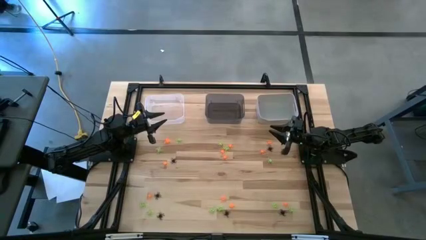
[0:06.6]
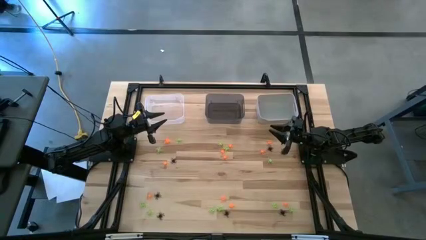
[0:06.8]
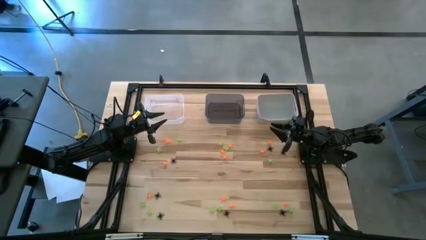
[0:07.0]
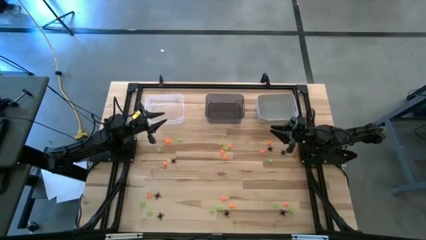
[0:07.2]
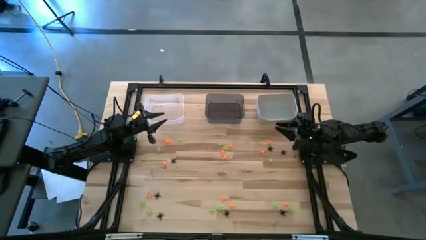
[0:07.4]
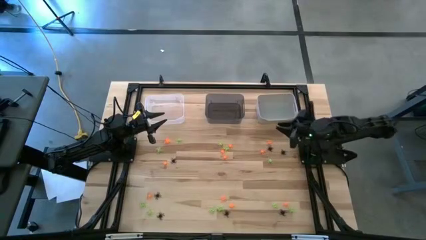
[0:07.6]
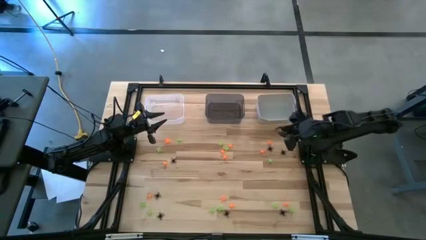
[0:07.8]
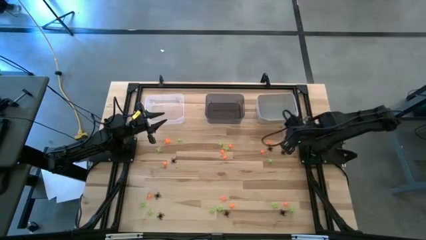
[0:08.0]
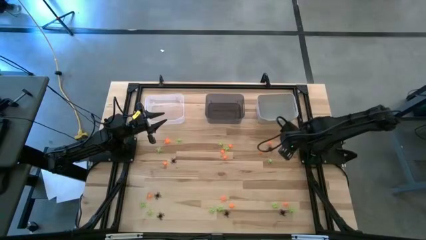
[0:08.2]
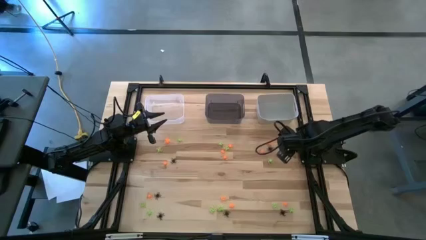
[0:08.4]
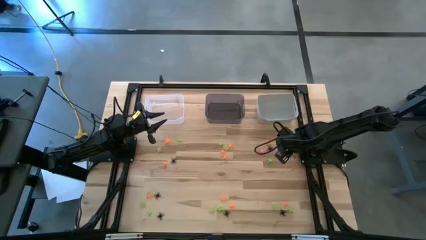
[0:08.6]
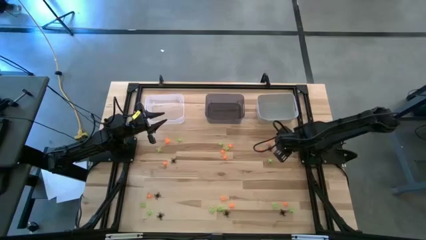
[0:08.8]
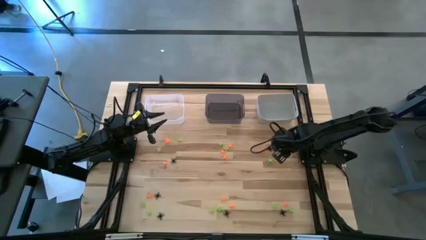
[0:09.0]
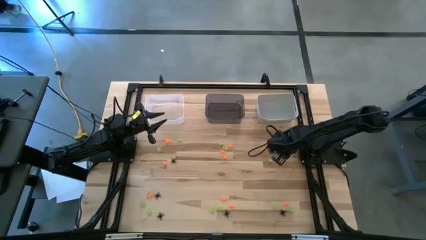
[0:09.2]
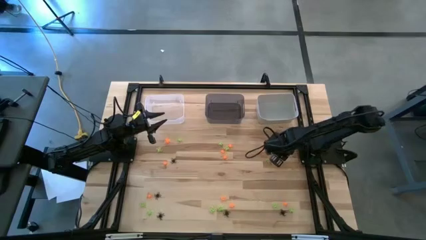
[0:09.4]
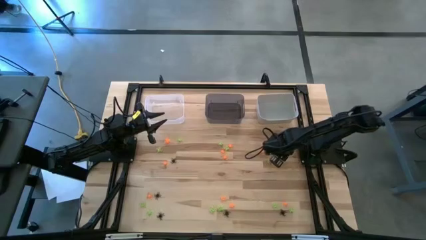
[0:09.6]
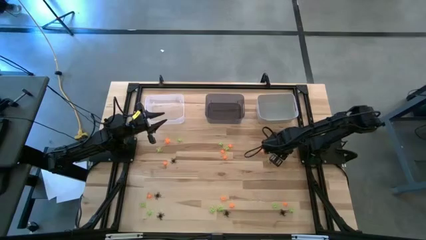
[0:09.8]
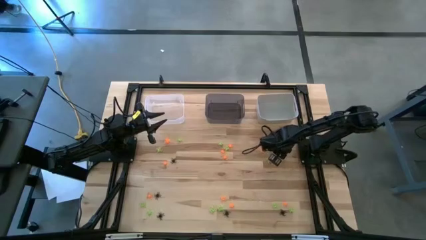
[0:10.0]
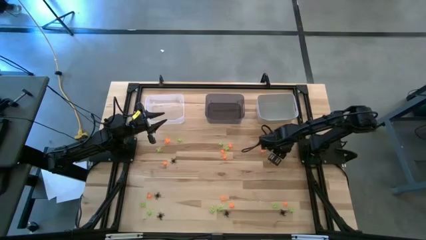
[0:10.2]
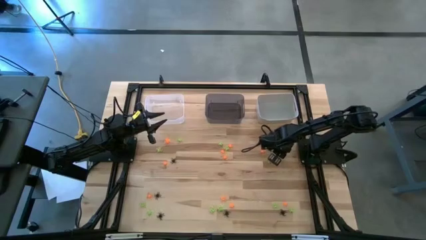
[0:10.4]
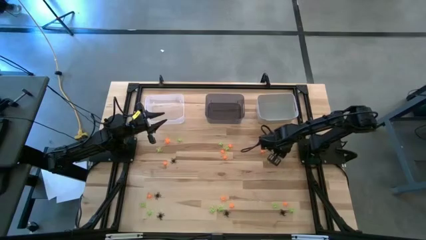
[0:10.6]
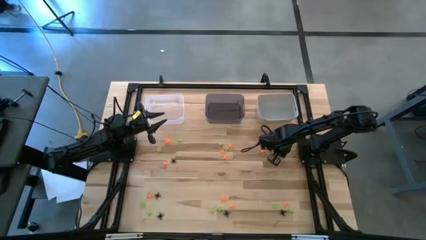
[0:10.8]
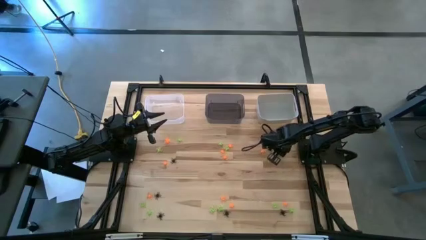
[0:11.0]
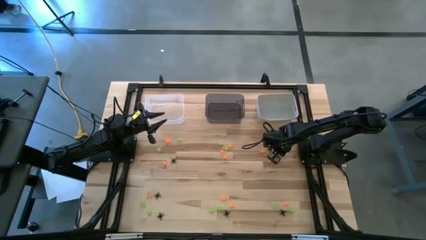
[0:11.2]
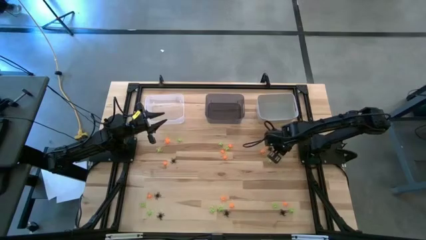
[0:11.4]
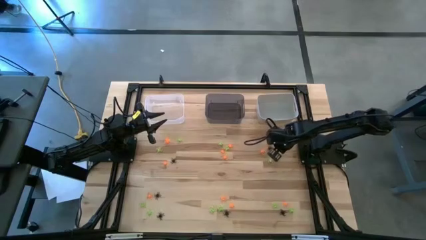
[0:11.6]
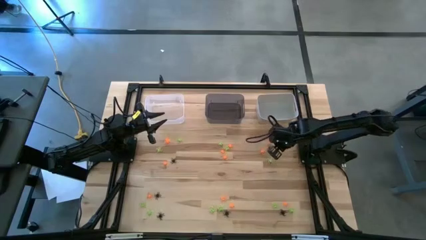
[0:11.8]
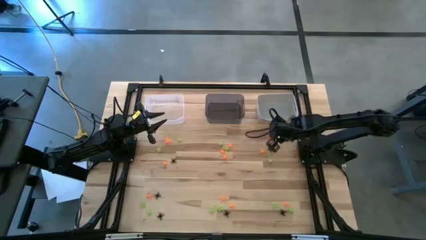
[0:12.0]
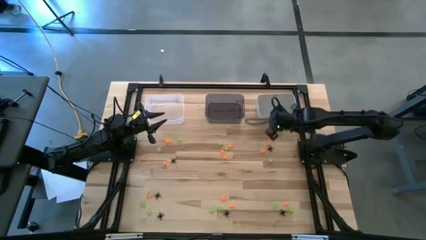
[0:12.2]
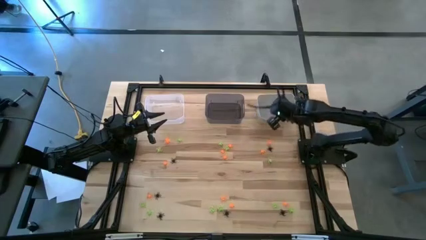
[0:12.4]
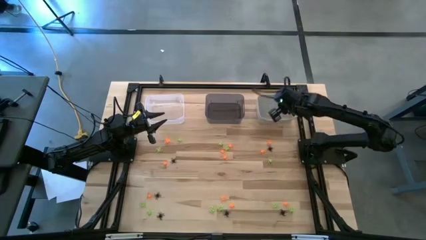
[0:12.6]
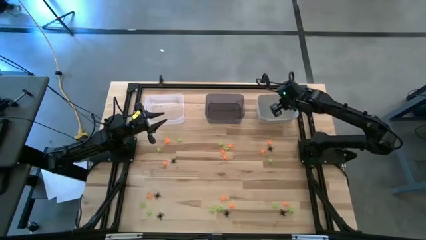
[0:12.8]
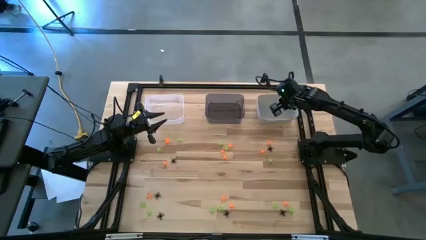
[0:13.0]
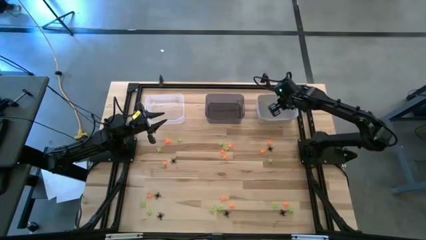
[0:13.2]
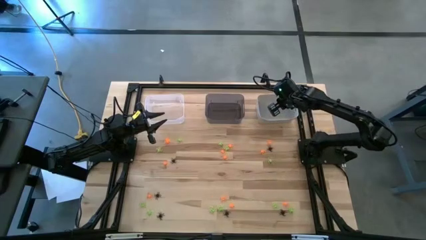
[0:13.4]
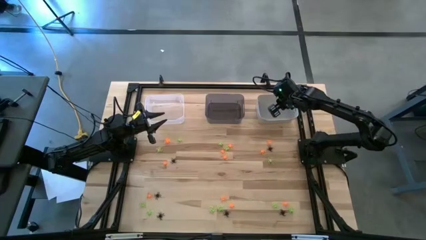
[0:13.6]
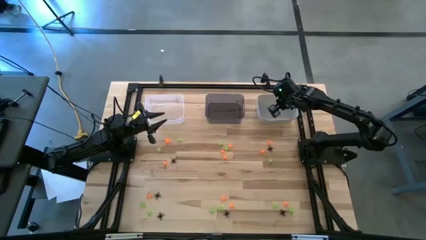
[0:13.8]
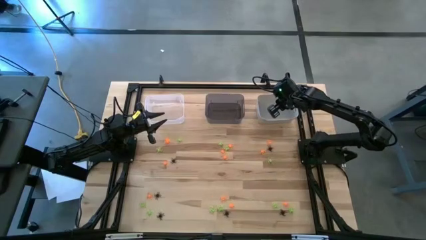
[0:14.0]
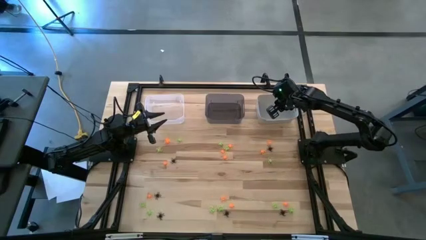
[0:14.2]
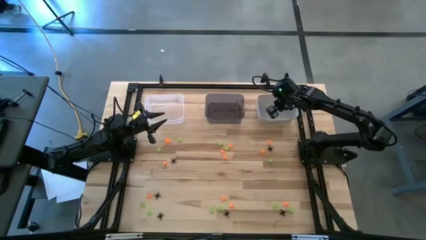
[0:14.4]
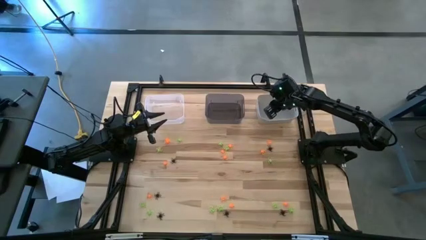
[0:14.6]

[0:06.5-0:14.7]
Task: Sort Halloween decoration
Put the black spider toy into the white bin

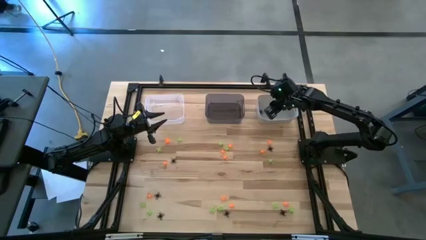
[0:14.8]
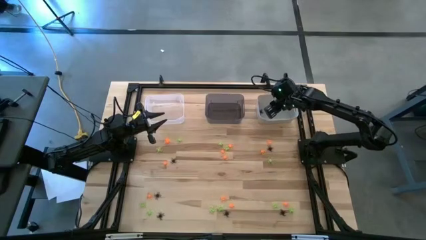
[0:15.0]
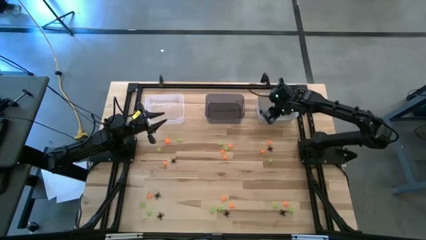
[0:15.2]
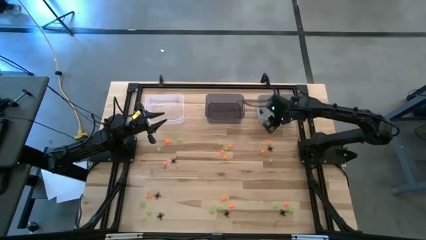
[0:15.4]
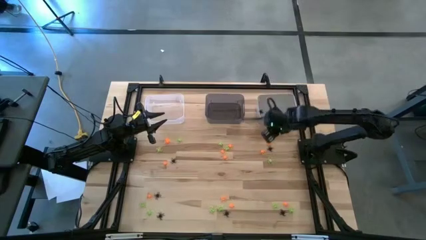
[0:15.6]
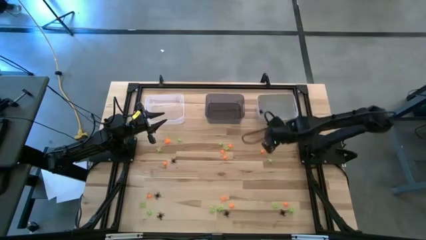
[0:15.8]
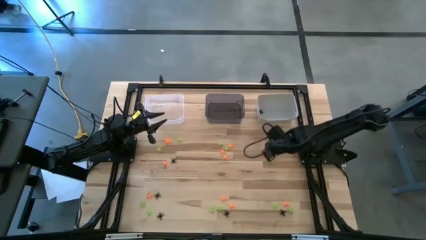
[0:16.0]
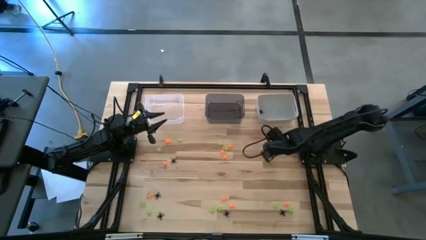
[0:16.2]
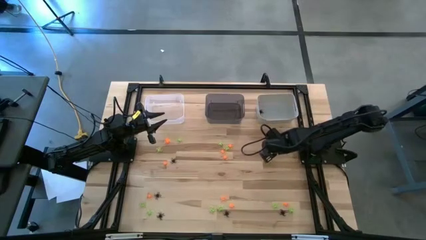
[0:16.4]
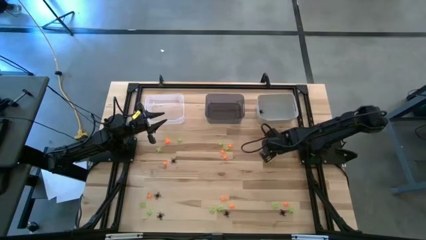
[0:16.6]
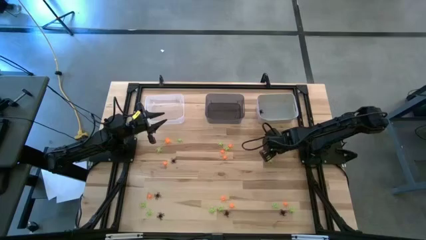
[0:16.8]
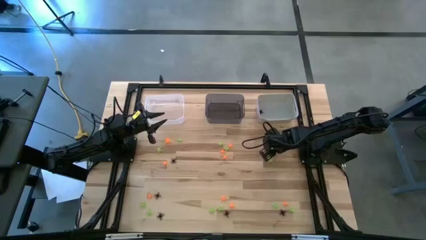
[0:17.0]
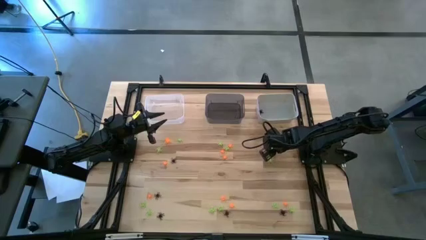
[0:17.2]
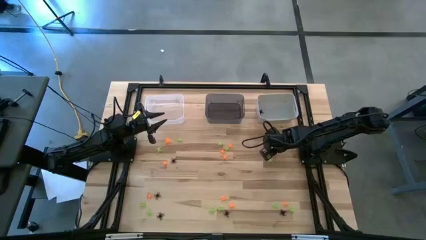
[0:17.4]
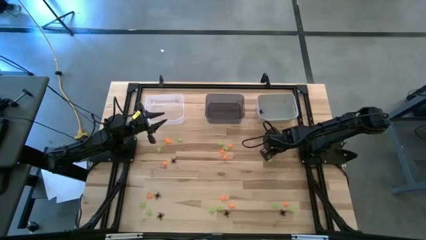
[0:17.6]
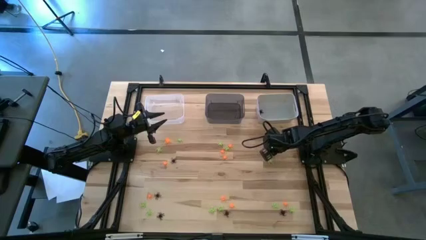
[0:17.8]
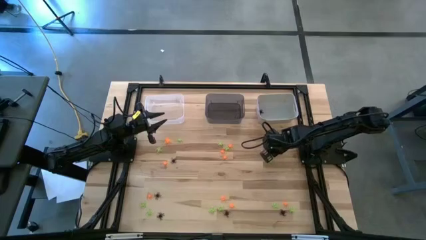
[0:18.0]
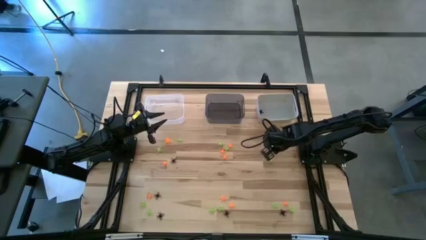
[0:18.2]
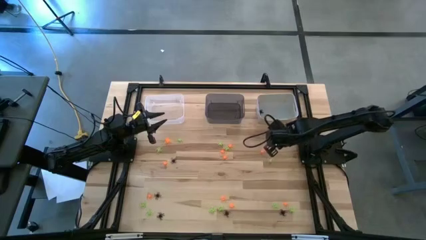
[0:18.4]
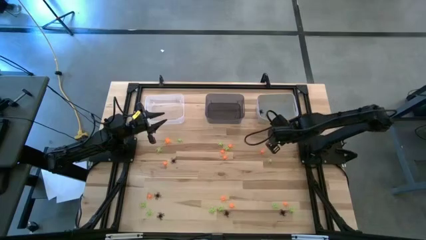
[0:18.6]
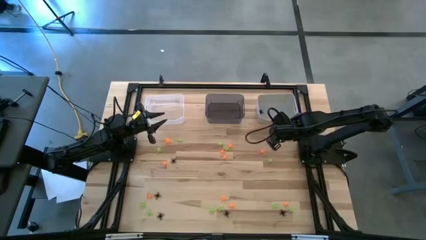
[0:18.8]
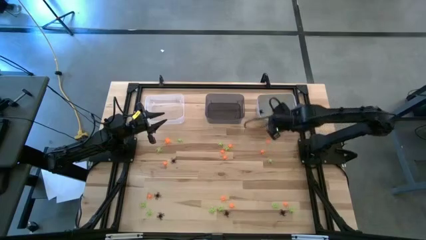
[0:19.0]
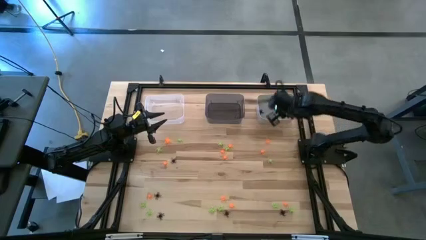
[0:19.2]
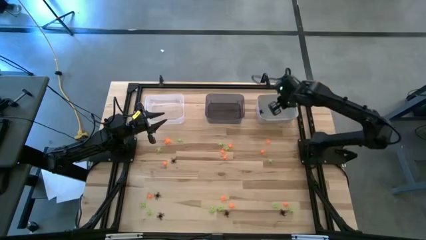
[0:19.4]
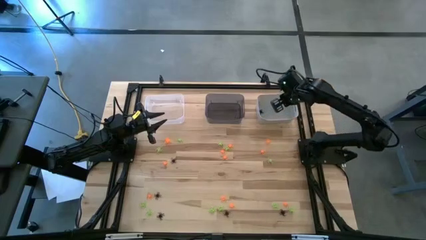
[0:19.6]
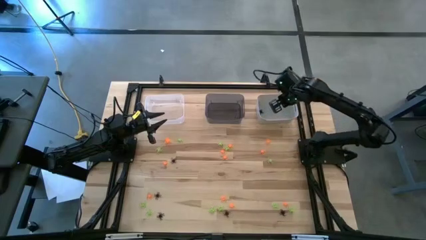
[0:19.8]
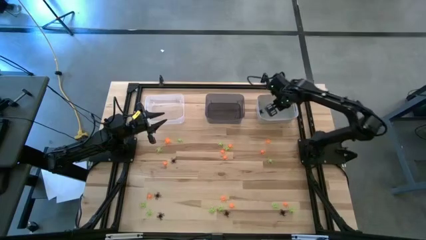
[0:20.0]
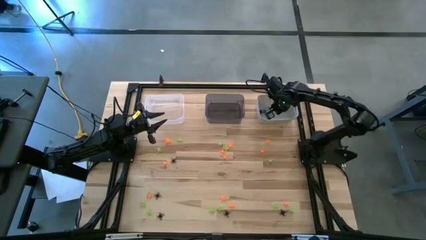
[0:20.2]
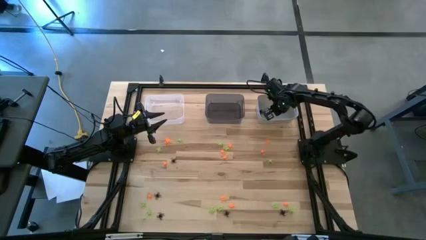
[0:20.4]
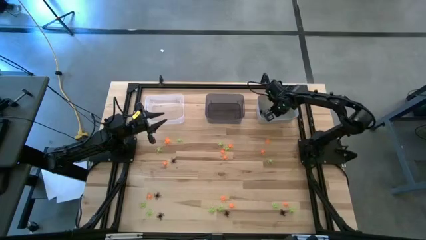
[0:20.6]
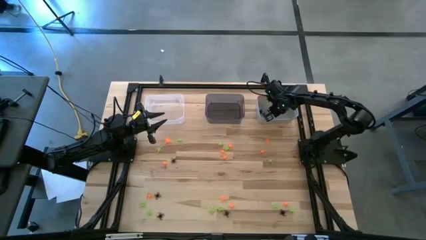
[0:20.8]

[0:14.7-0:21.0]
Put the black spider toy into the white bin

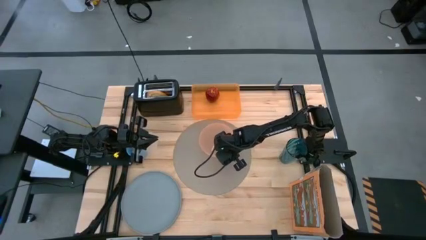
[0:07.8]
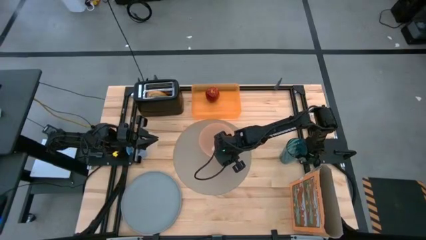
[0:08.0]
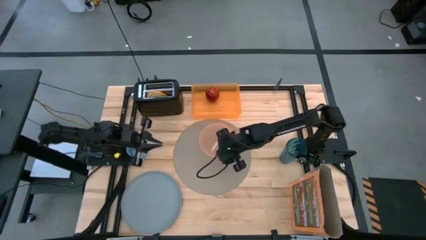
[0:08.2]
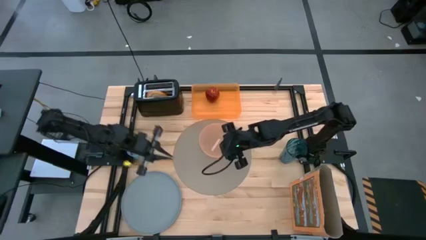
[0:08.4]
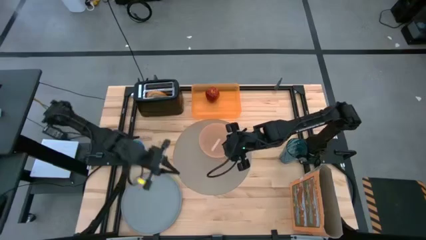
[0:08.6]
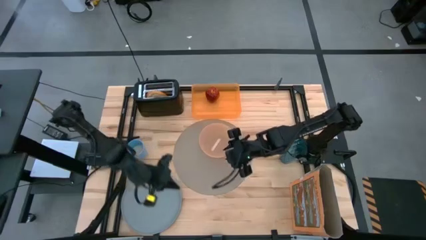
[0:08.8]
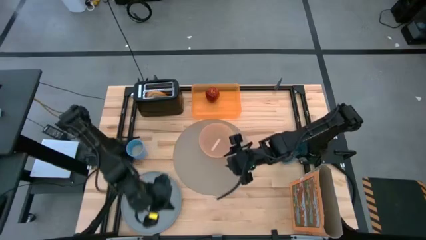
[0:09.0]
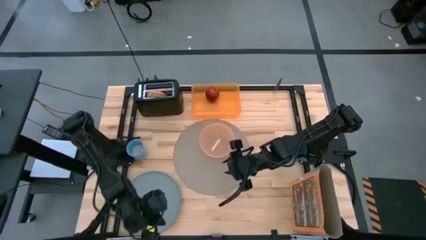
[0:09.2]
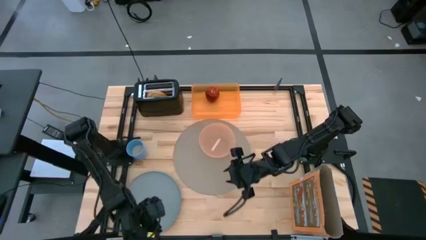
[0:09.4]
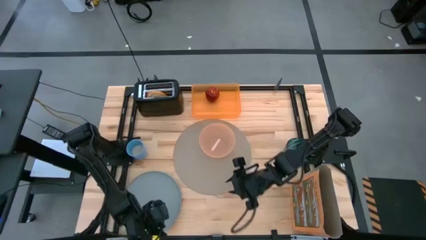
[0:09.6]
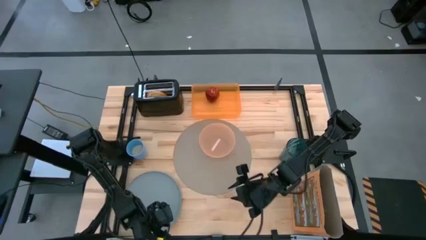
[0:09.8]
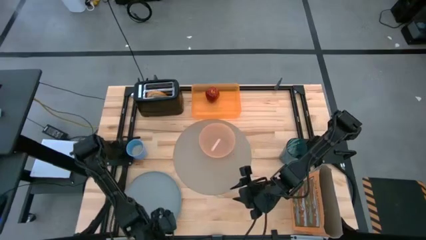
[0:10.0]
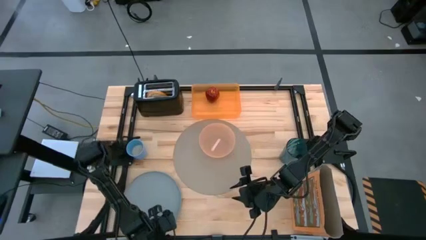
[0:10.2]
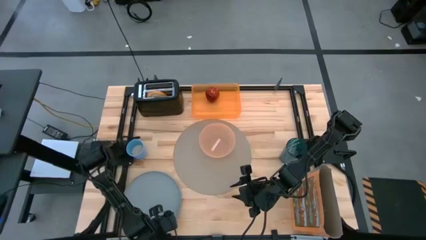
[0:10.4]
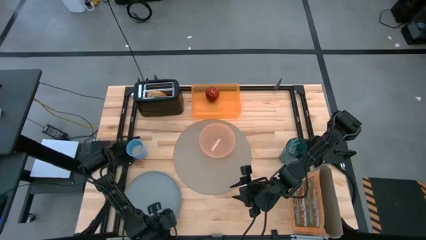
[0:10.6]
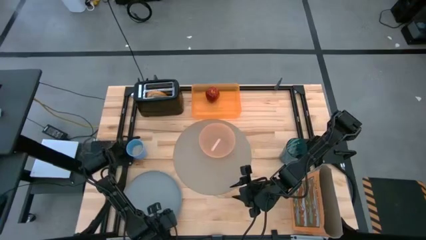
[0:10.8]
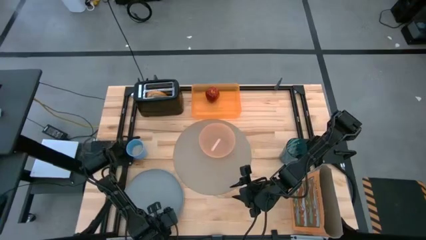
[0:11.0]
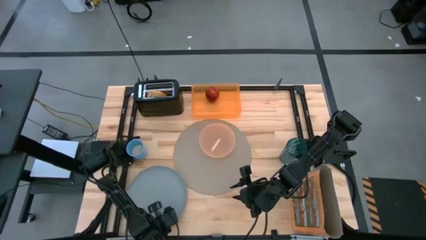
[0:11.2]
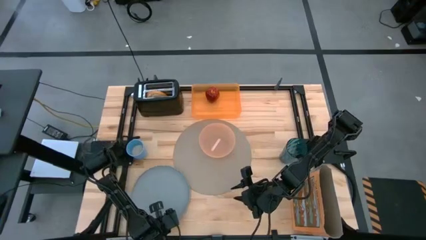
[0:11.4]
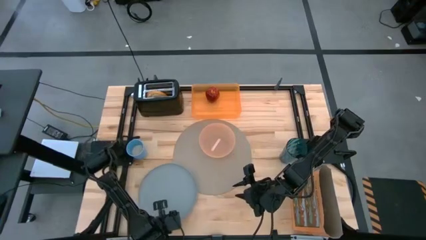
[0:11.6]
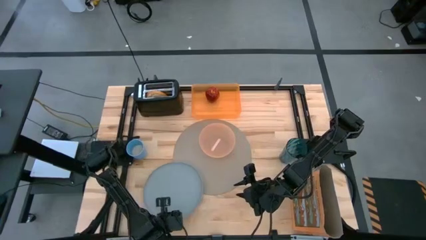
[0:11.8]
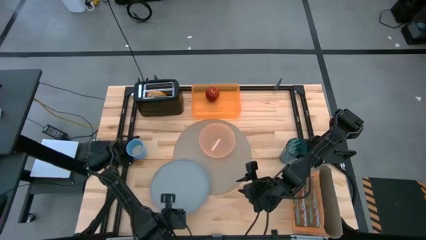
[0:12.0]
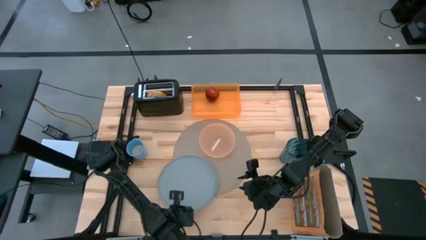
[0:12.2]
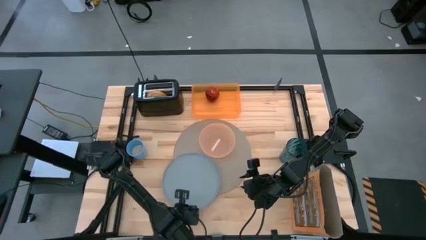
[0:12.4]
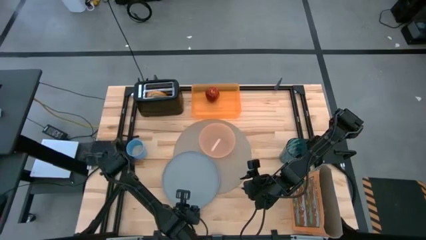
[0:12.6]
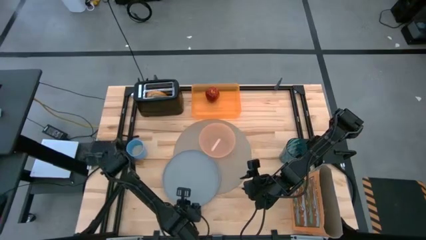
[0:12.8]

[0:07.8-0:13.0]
Task: Arrange a breakfast setting
Put the light blue plate on the gray mat
